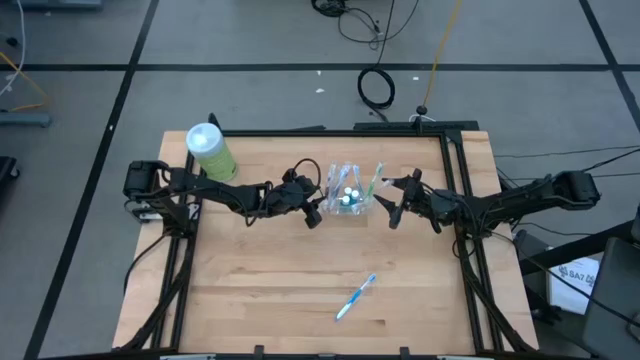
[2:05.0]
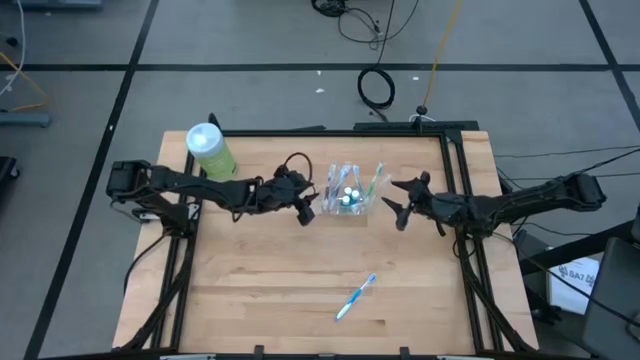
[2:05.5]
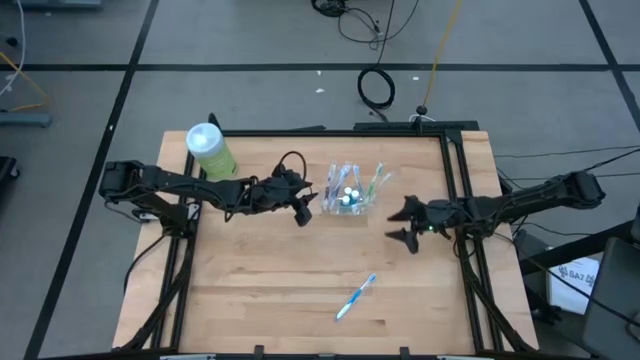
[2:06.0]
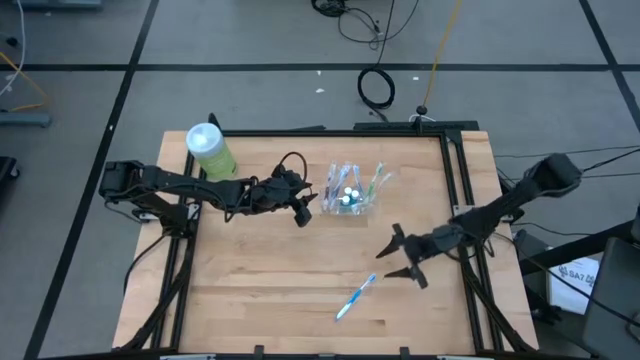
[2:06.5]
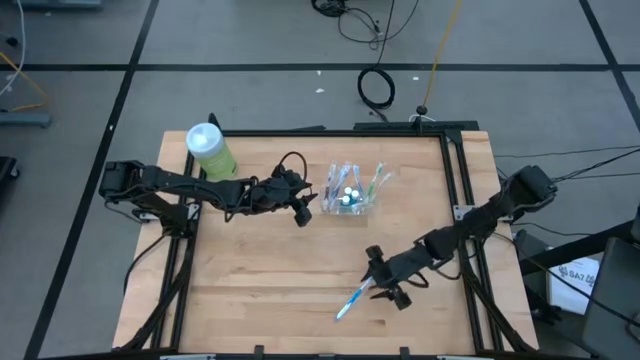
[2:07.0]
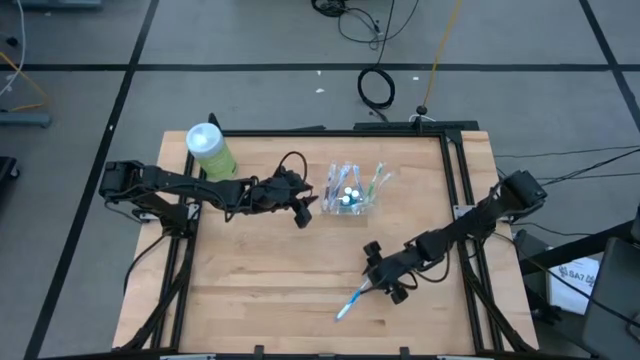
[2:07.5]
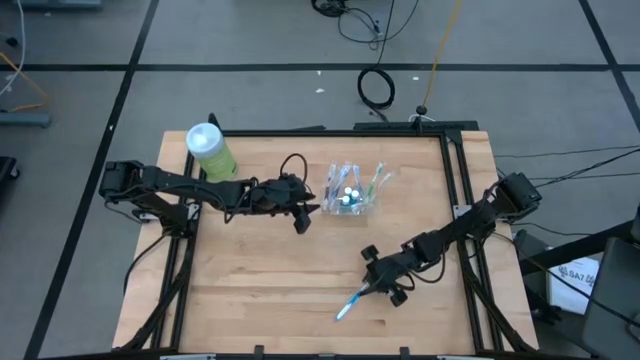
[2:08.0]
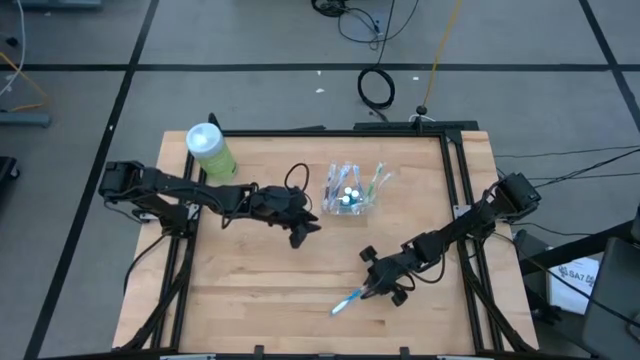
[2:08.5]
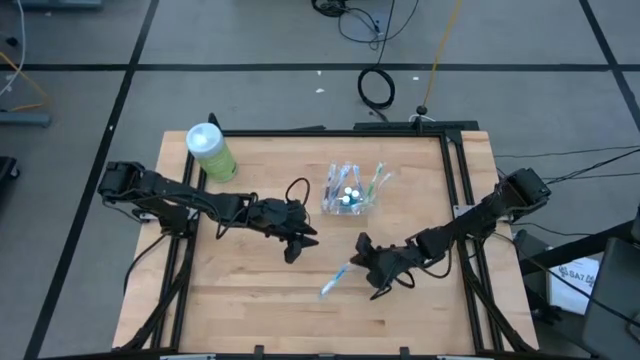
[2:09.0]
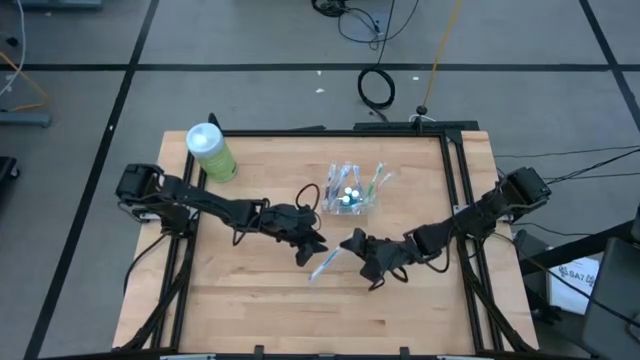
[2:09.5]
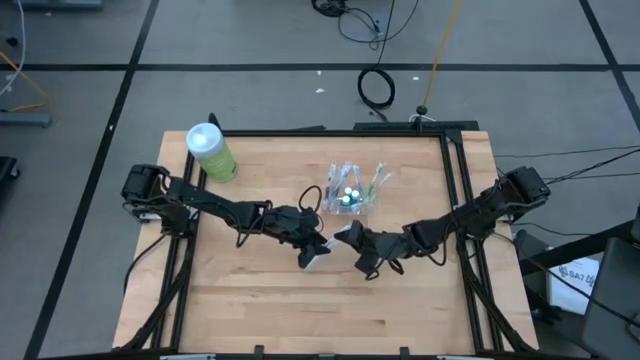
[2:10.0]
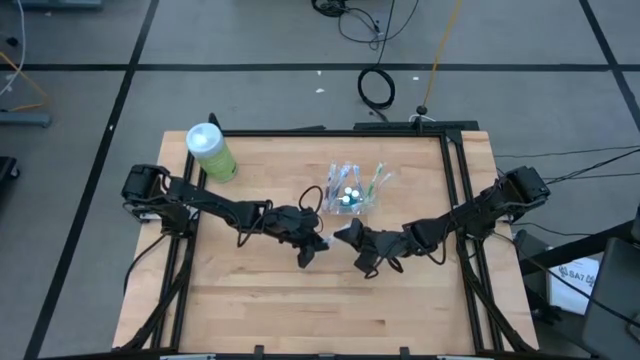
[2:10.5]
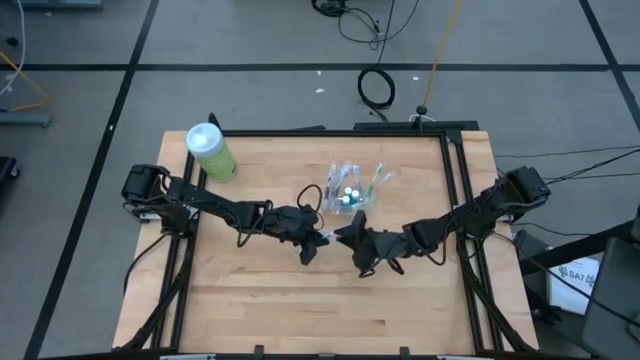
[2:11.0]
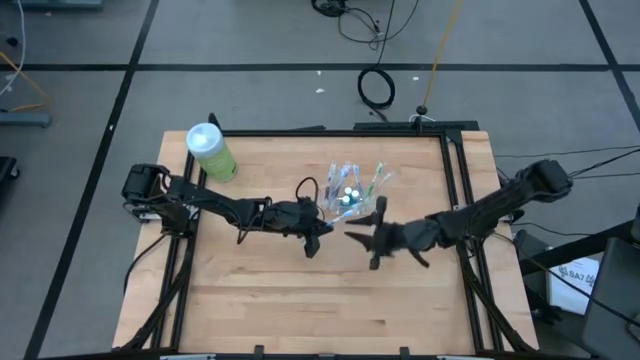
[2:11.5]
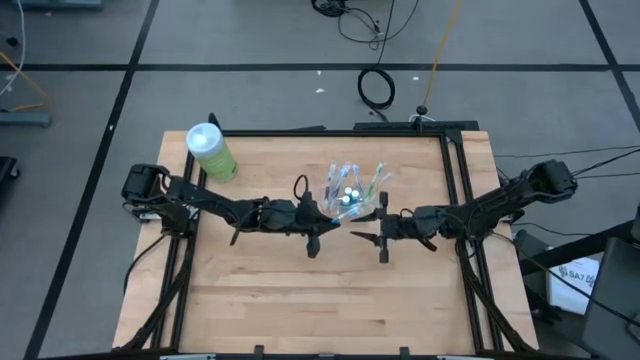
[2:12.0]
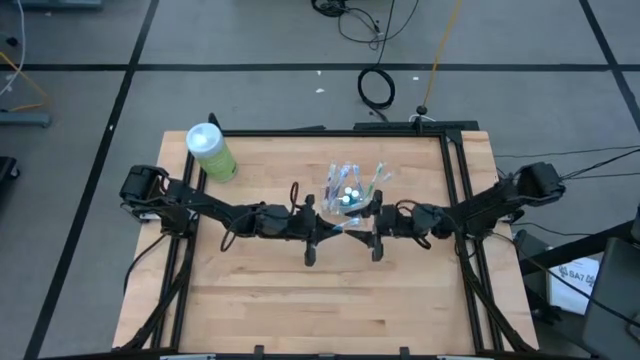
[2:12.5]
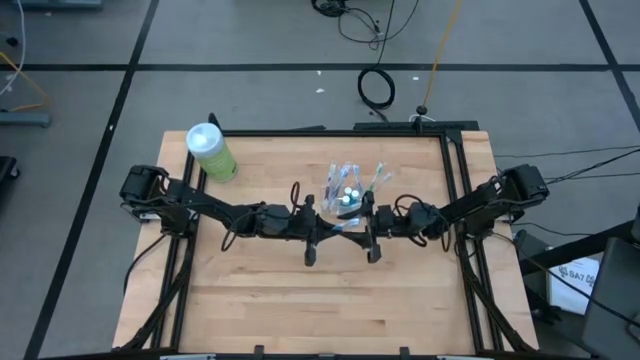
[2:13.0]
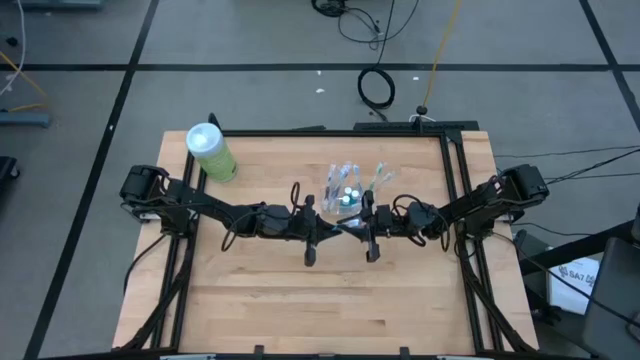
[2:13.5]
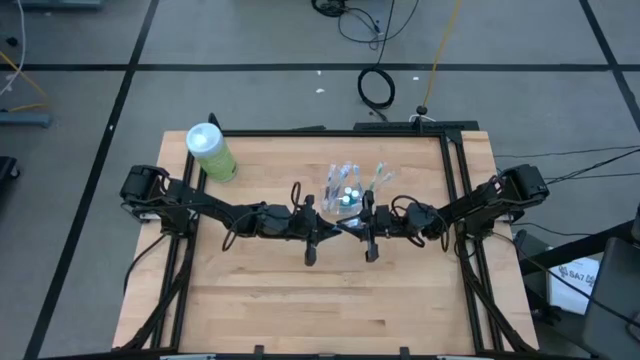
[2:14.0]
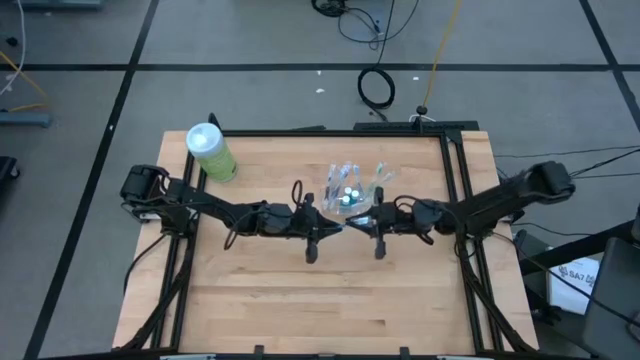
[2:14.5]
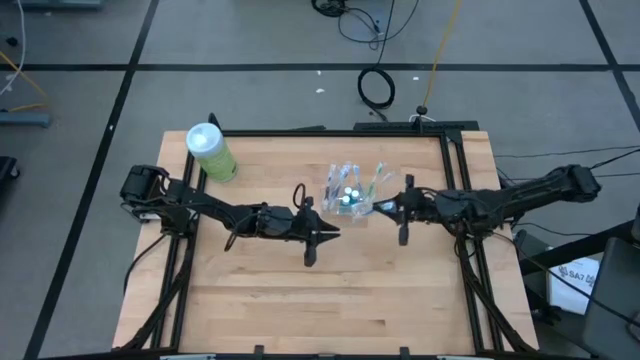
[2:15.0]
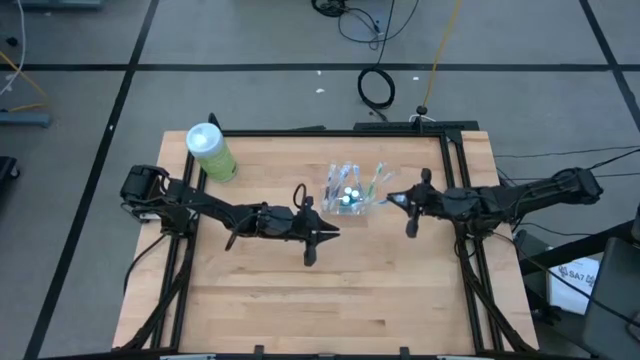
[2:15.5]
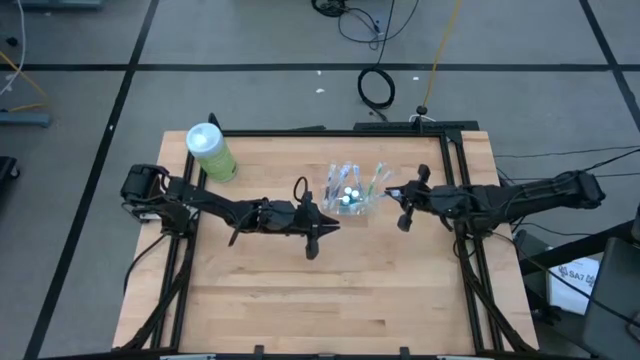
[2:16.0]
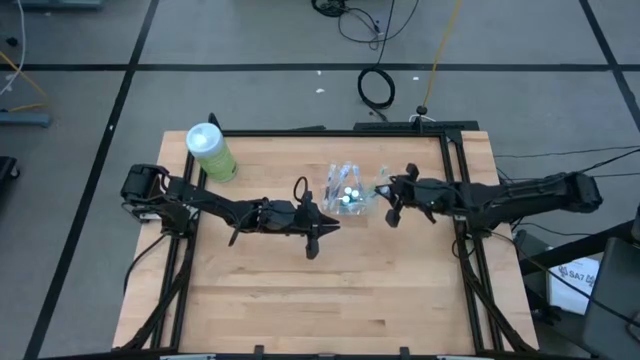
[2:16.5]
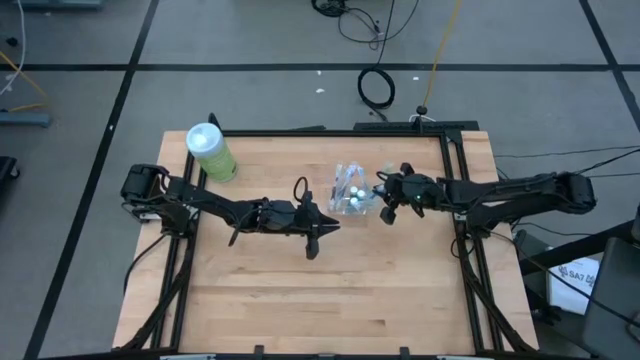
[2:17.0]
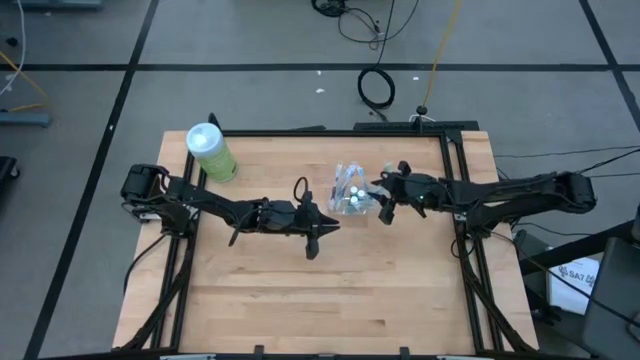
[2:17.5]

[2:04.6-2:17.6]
Task: Pick & Place toothbrushing station
Put the blue toothbrush into the organizer

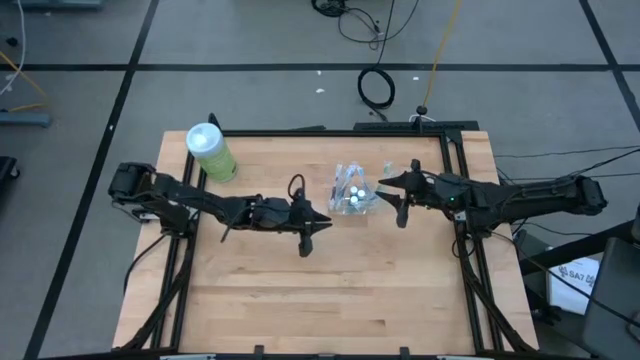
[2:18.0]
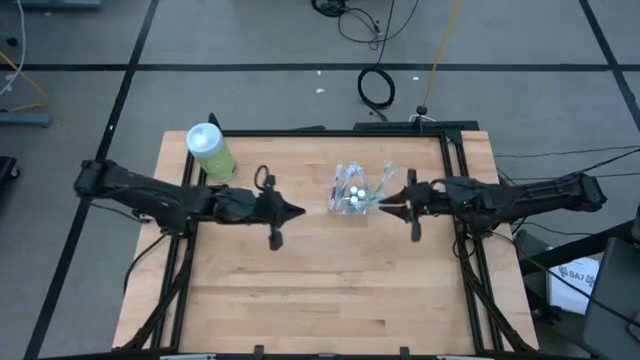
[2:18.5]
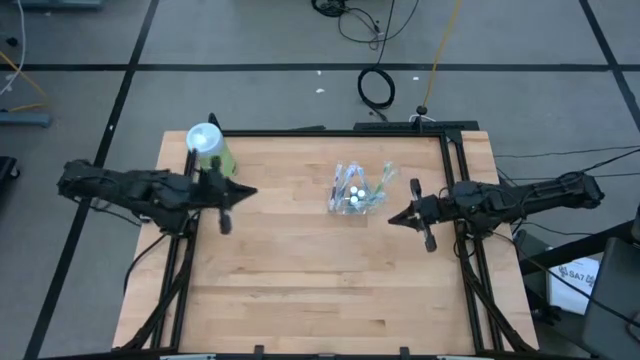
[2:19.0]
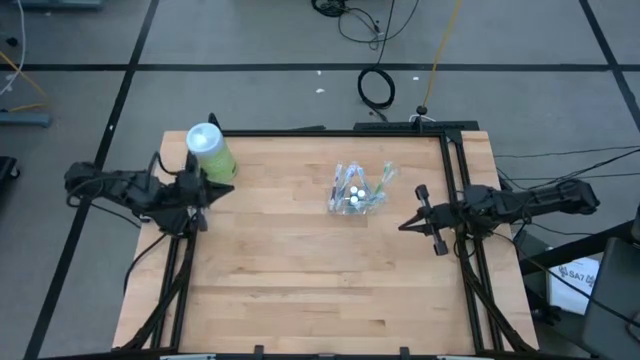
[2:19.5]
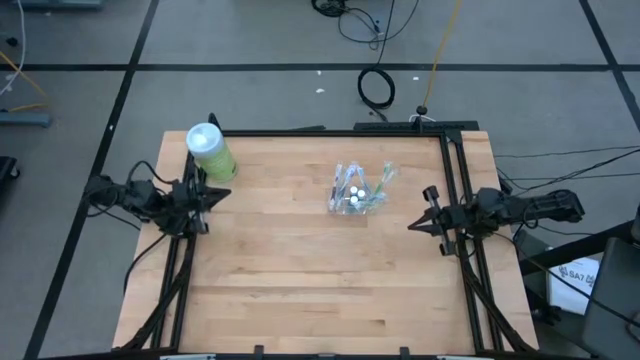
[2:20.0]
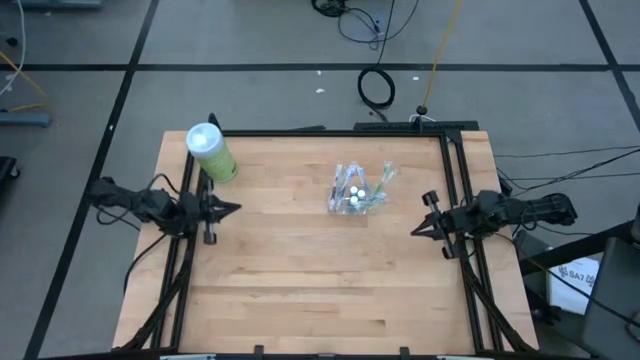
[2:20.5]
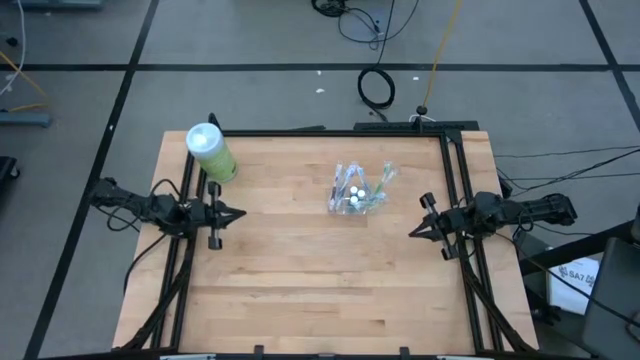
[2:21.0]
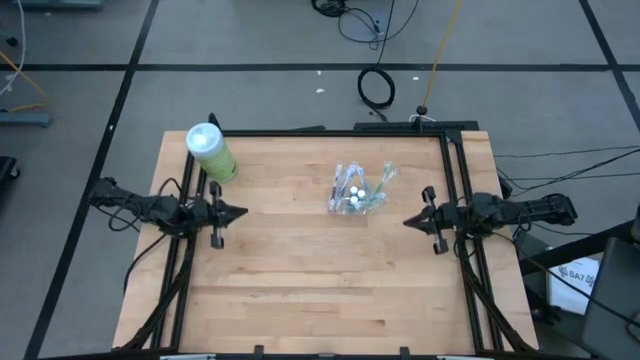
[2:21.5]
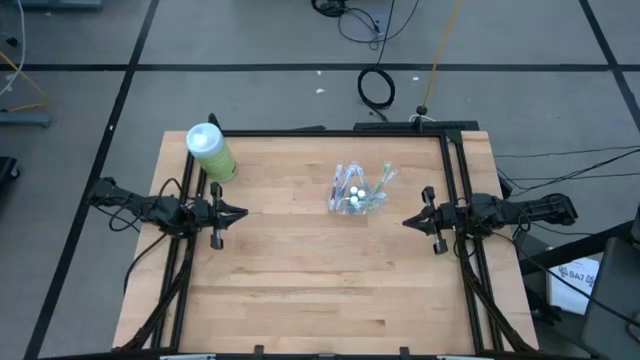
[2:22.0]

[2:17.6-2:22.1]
Return to Home Position

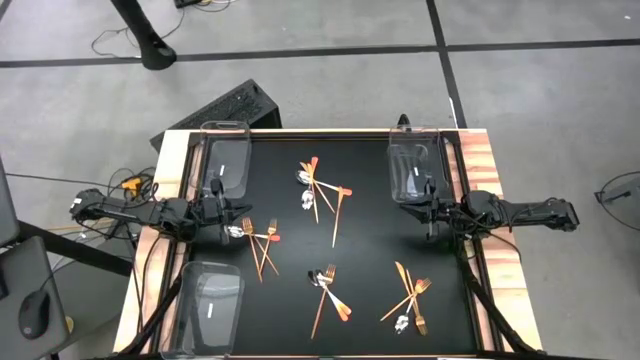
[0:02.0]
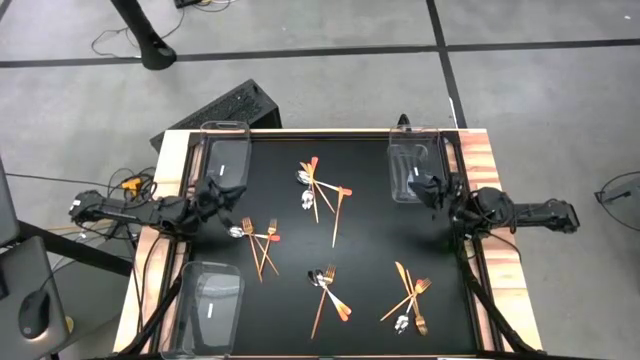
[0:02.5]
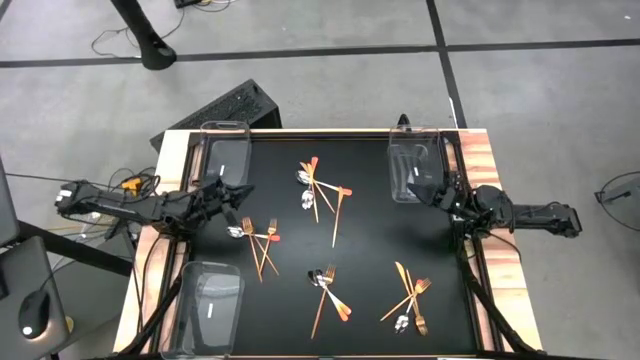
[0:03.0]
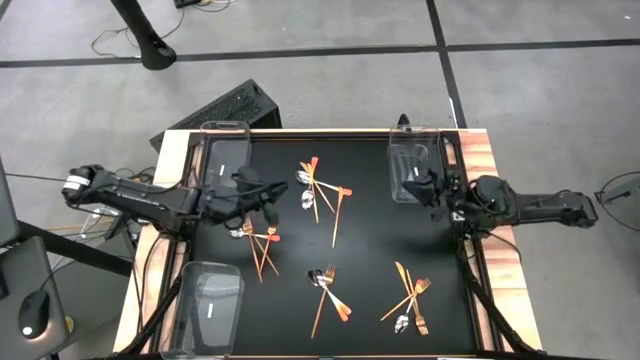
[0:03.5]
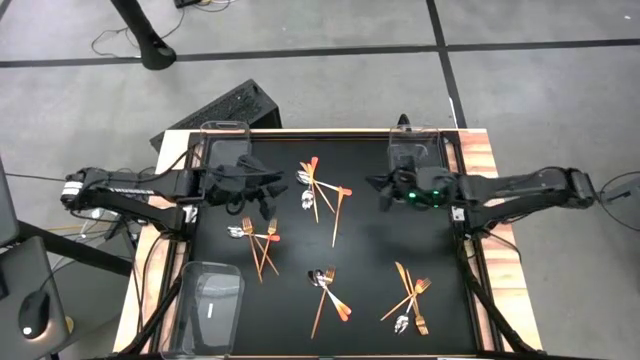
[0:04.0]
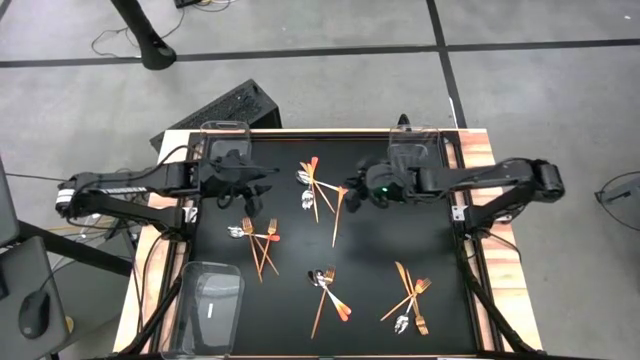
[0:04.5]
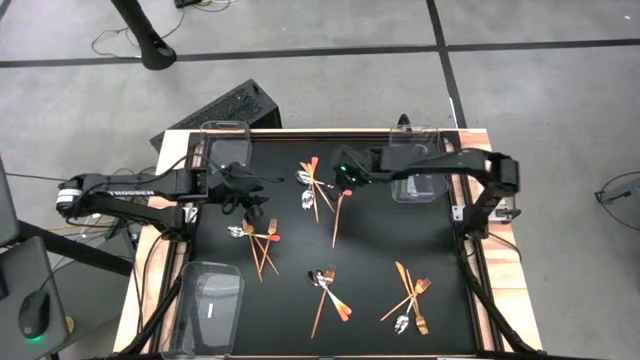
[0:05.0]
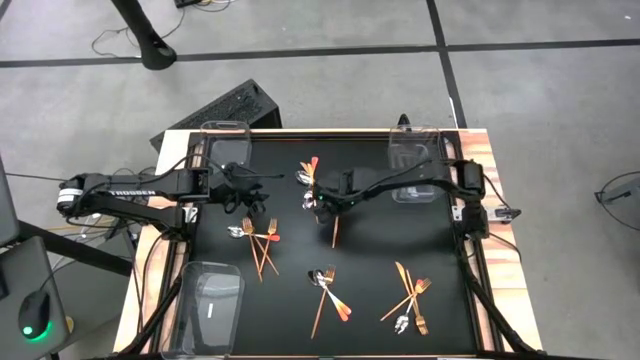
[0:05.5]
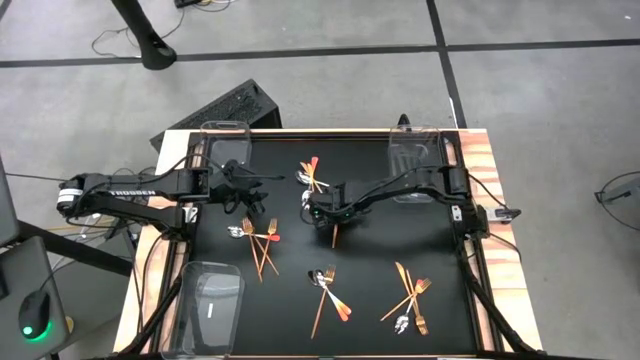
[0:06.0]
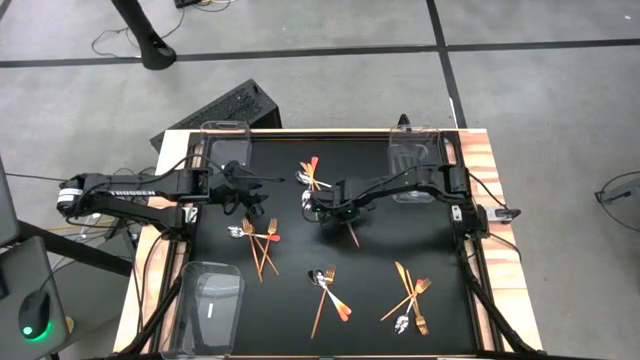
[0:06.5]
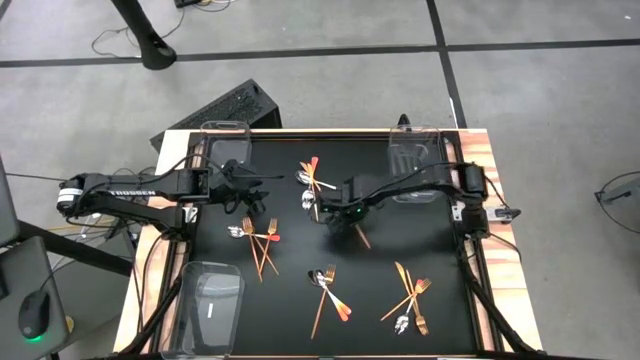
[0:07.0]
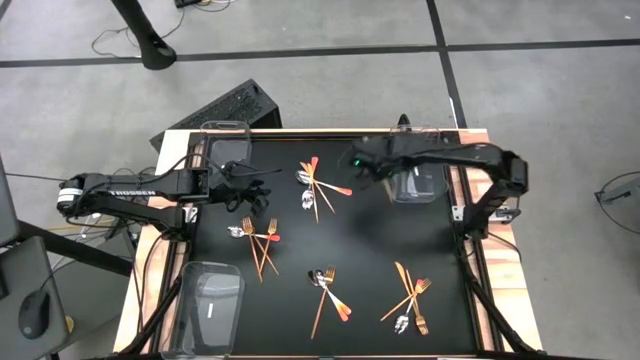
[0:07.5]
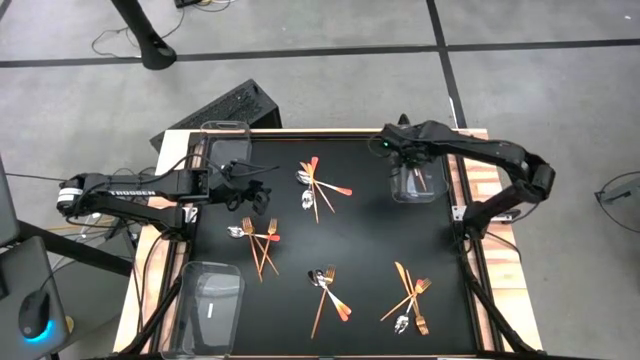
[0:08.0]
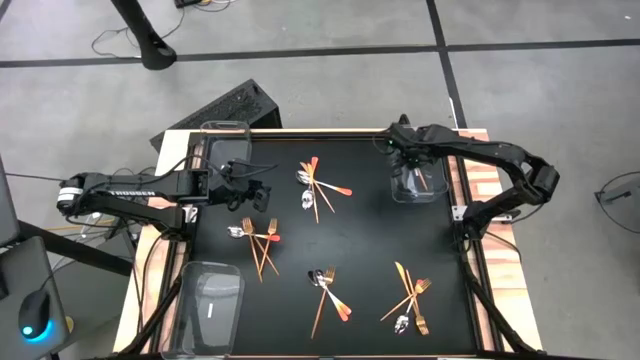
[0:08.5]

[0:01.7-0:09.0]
Task: Sort silverware by color (type)
Put the gold table knife into the top right transparent bin
